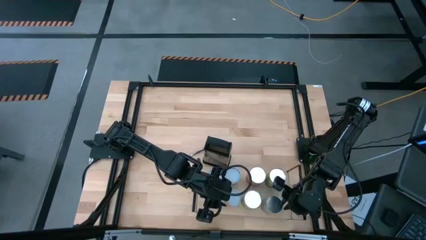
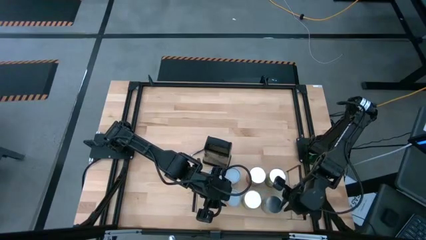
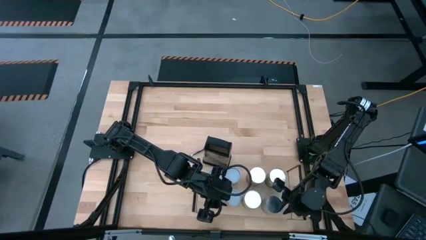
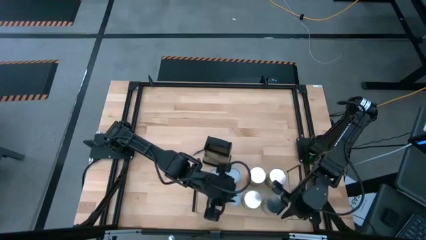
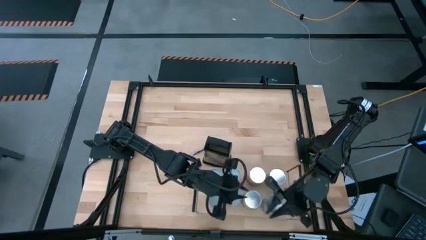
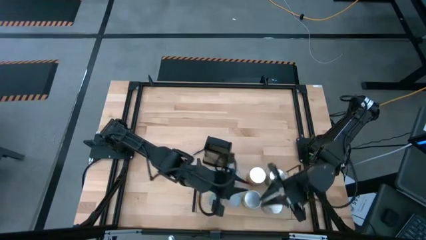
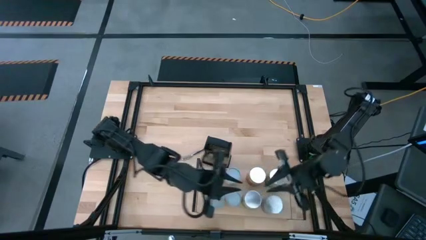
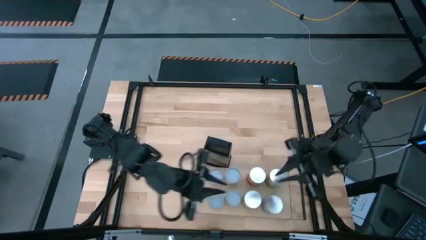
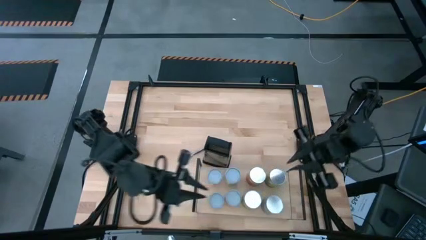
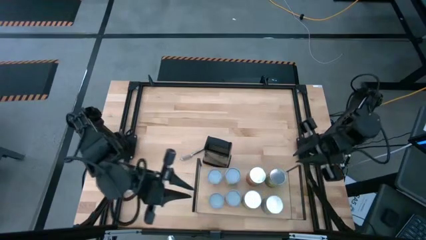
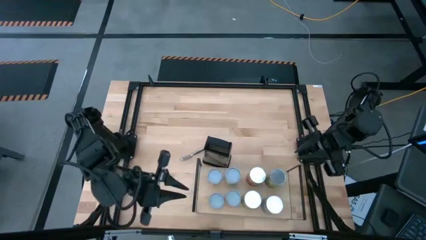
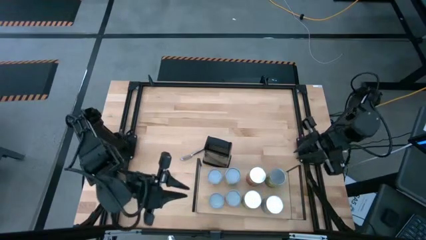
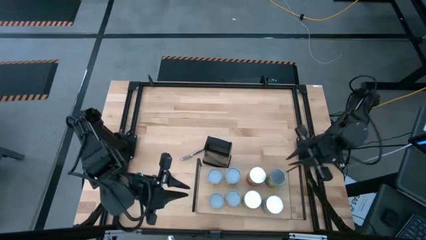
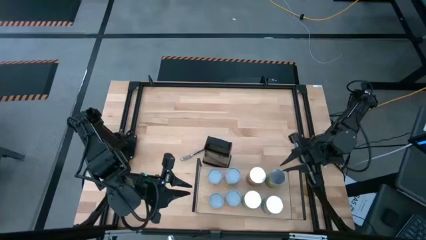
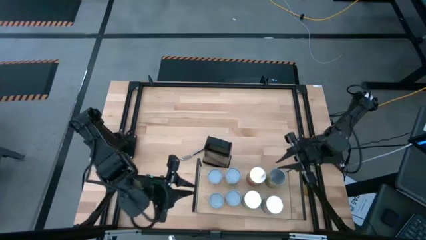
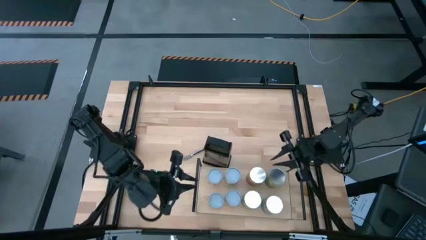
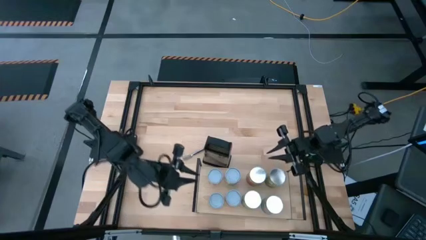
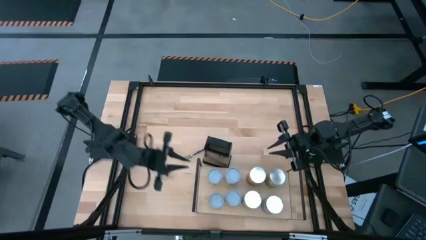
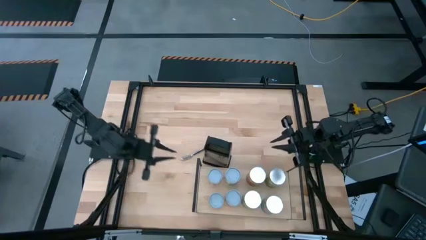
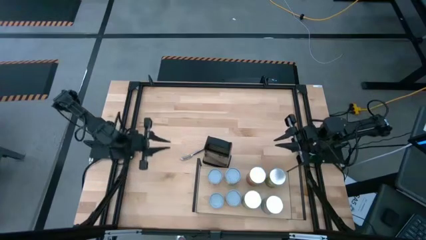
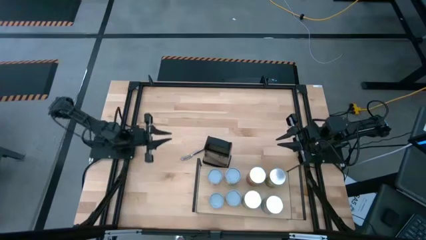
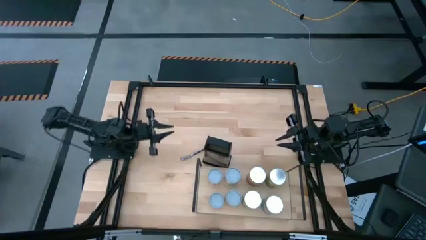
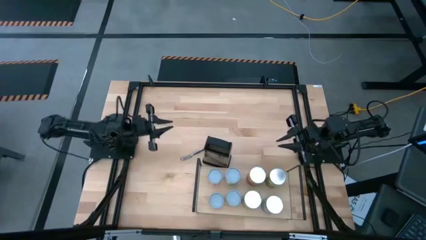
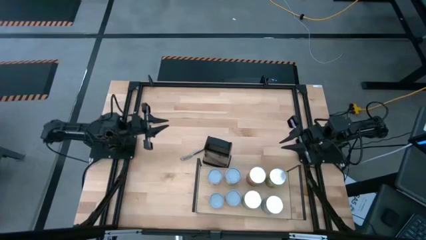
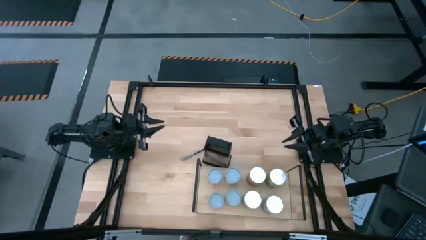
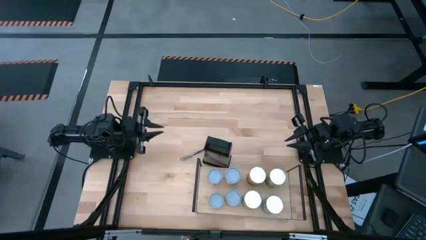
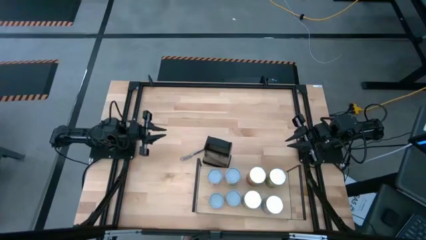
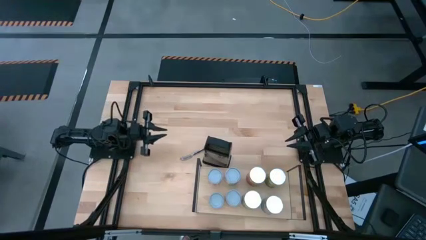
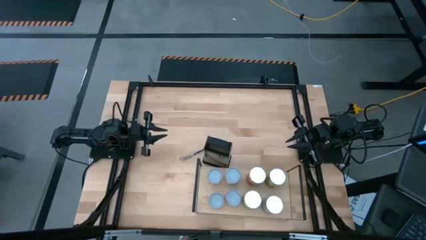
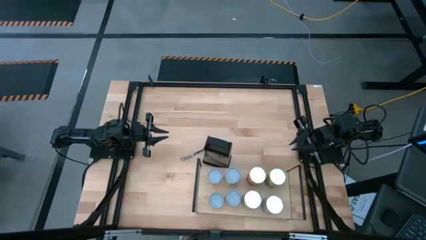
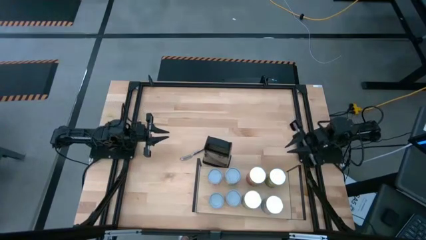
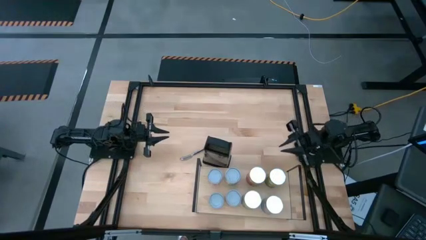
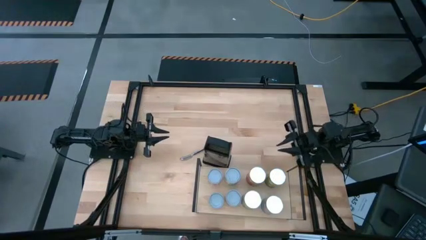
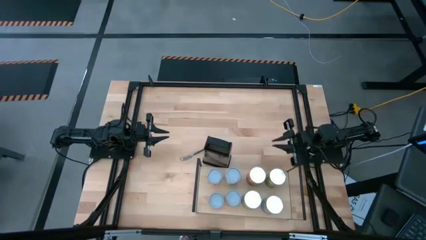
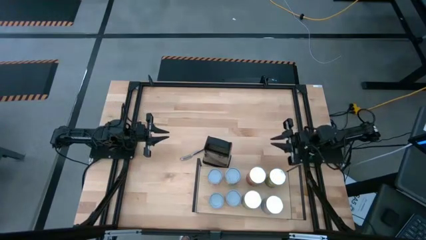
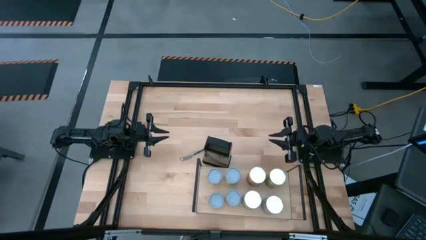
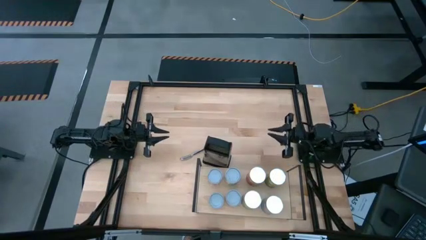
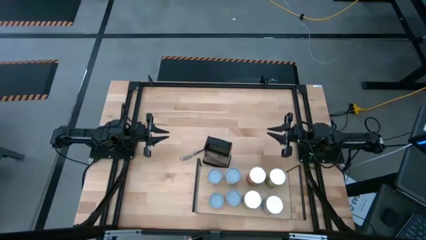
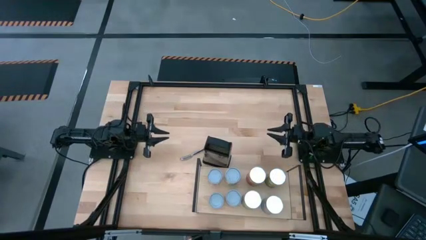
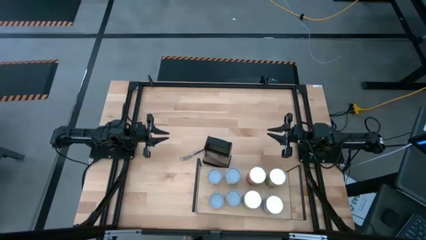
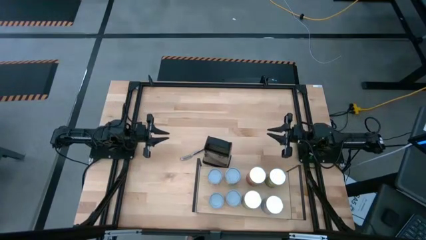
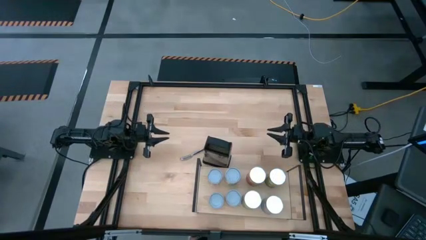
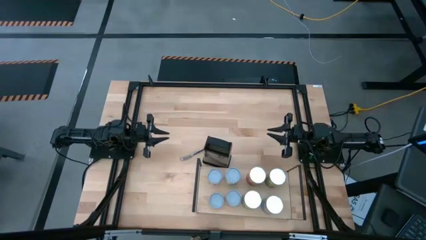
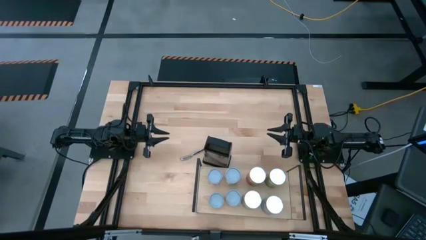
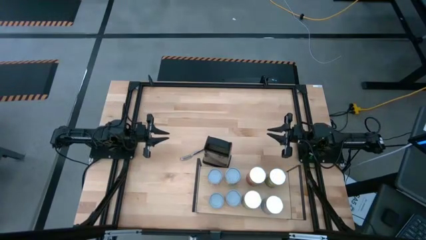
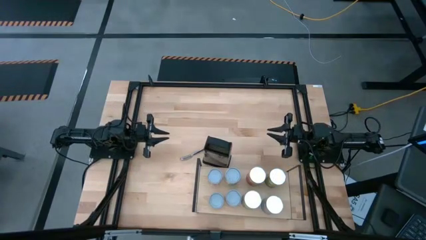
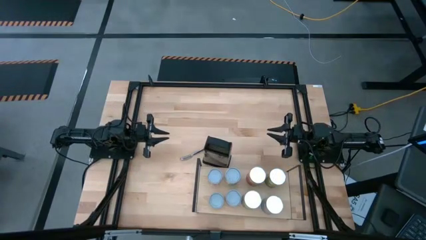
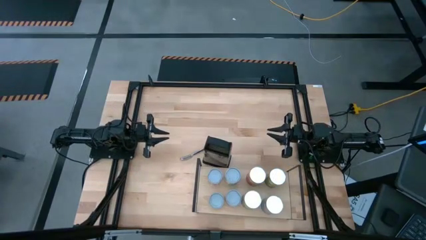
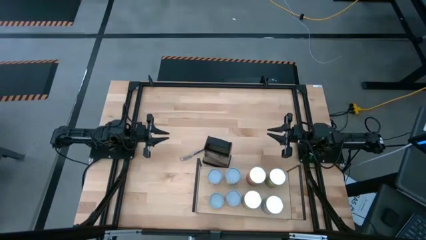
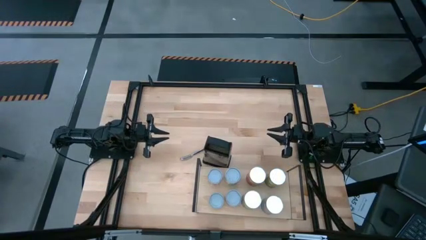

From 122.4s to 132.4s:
Task: Pick and place cans onto a shelf
Return to Home Position

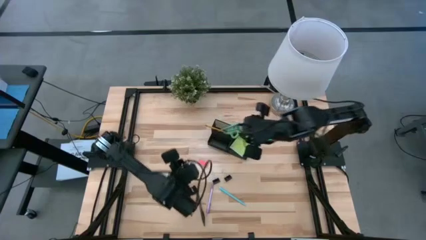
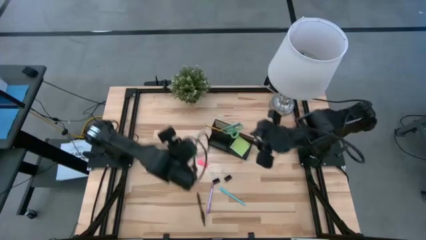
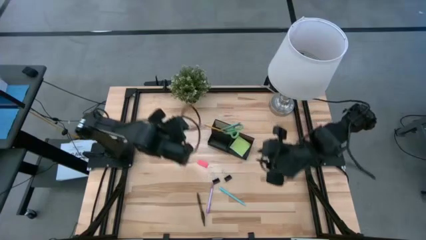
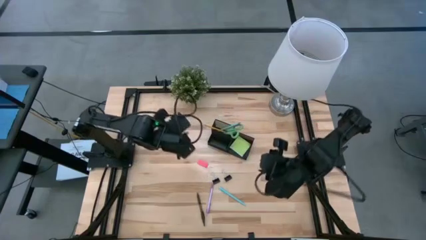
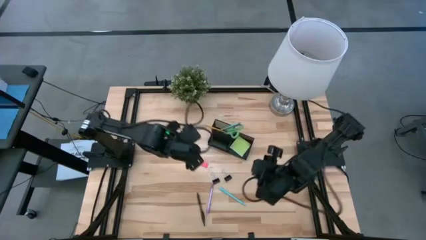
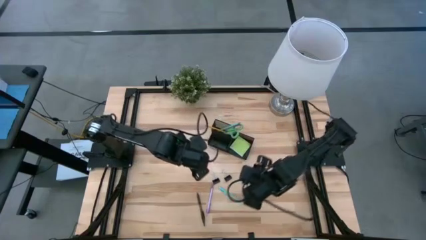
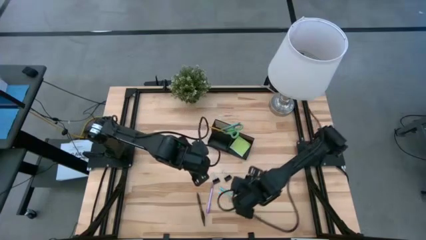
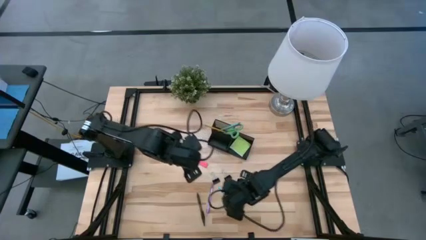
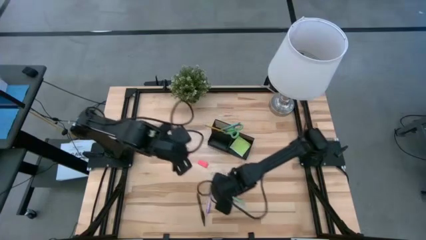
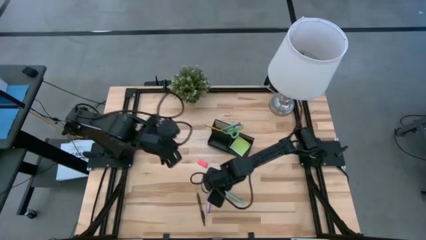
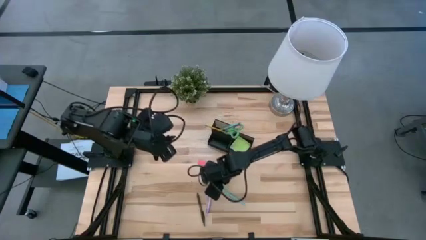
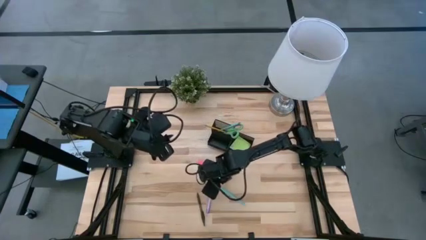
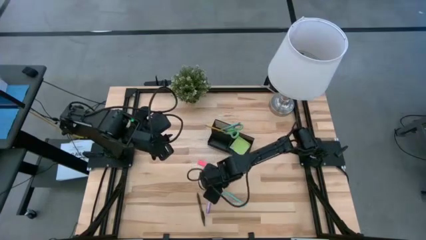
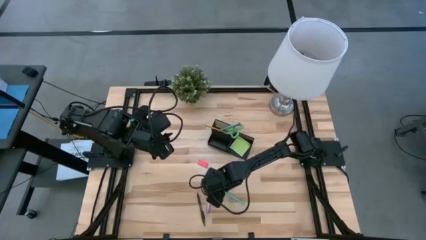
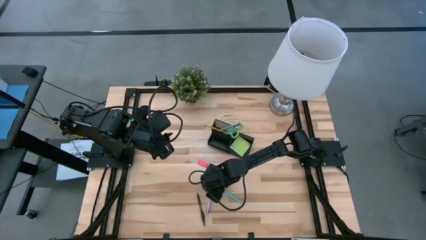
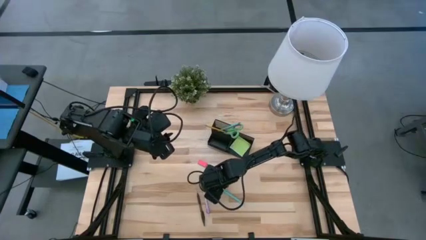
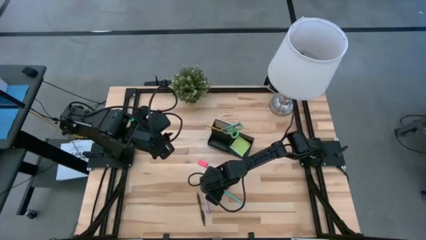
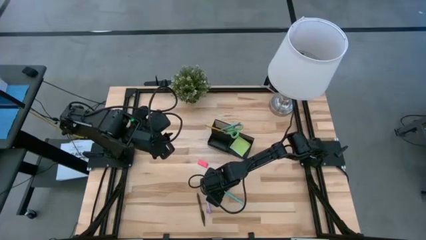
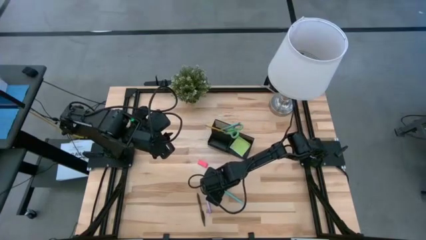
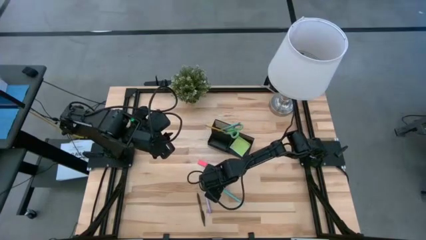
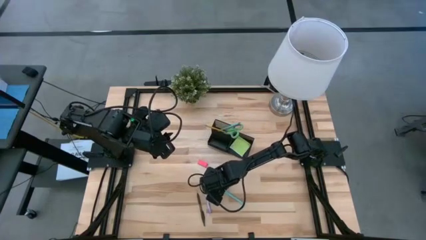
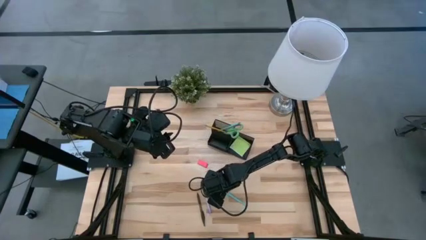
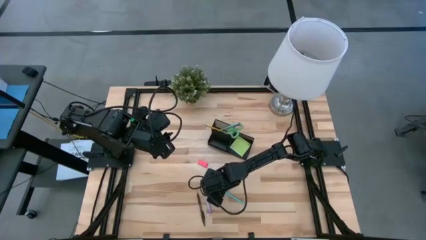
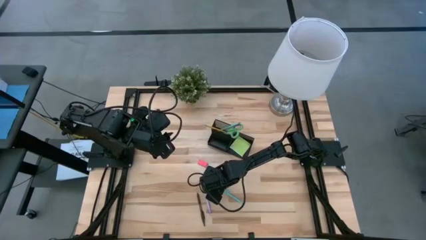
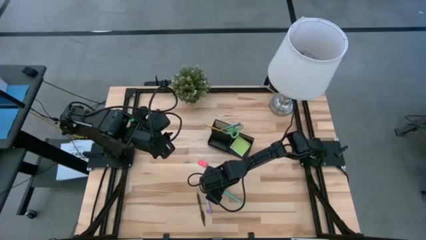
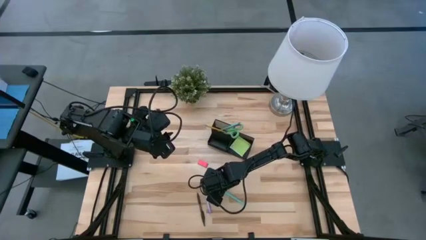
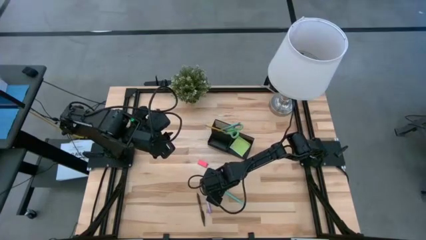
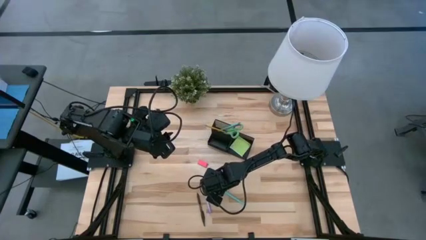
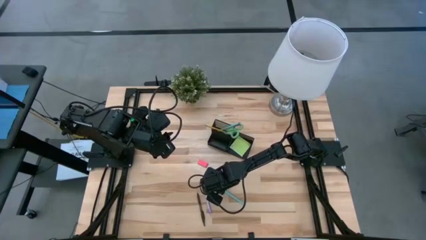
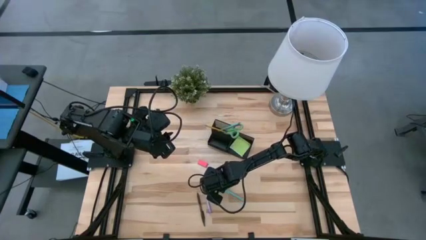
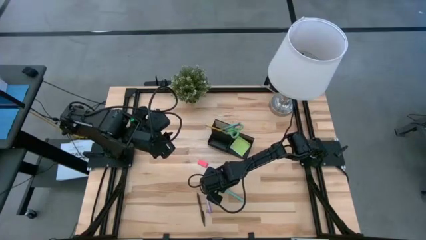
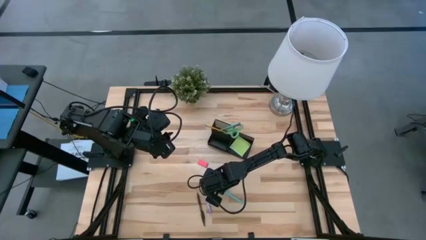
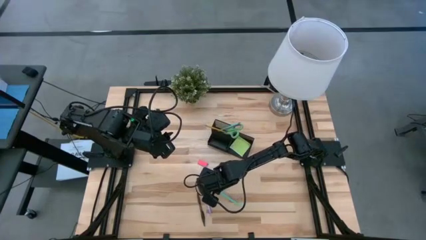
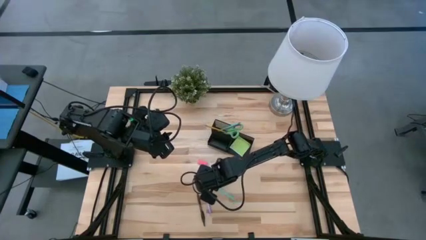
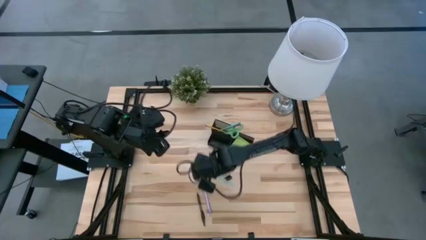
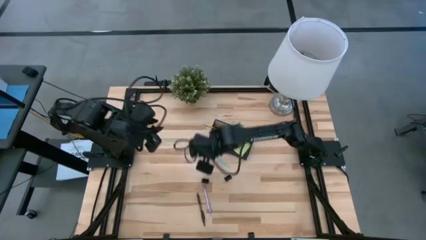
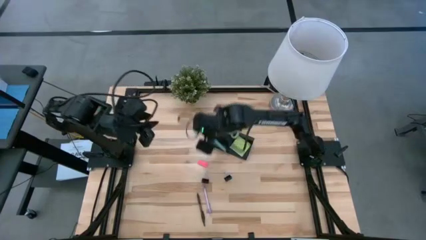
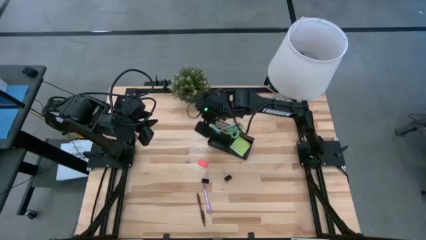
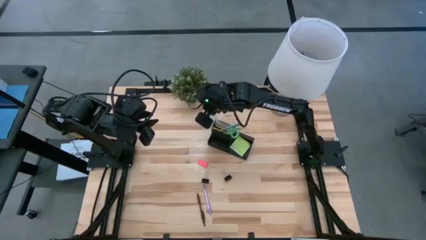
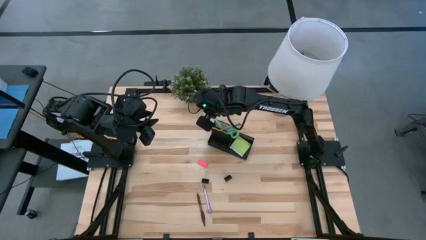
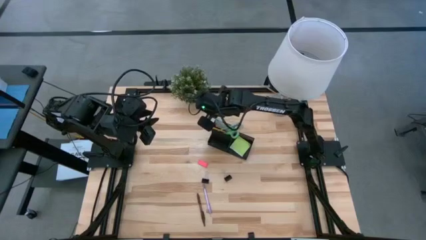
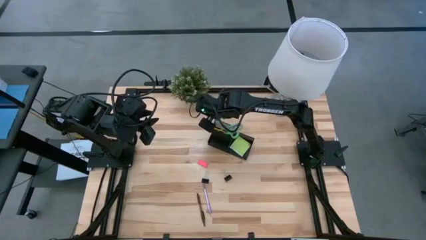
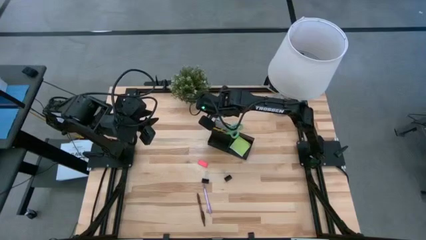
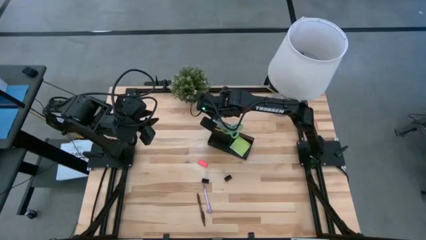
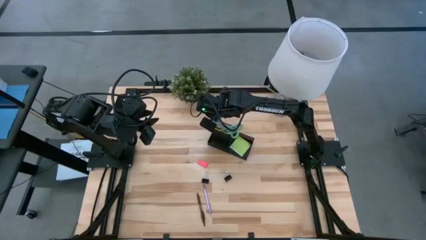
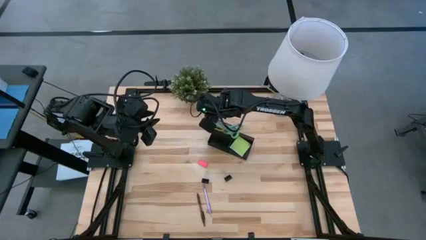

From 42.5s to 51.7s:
Task: Pick and place office supplies into organizer
Put the blue ballpen on the black desk organizer
